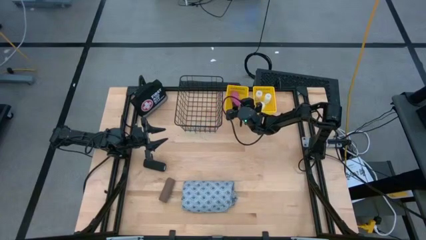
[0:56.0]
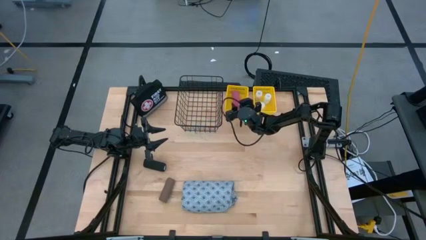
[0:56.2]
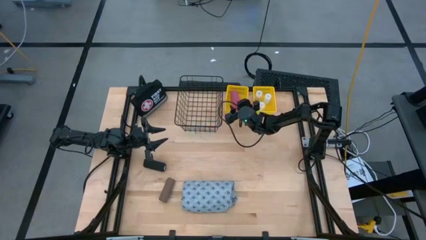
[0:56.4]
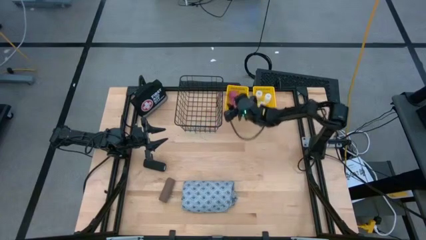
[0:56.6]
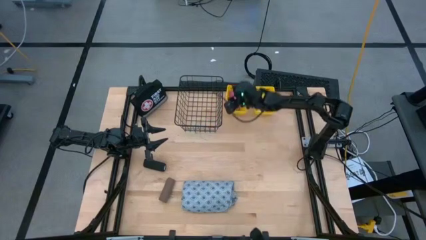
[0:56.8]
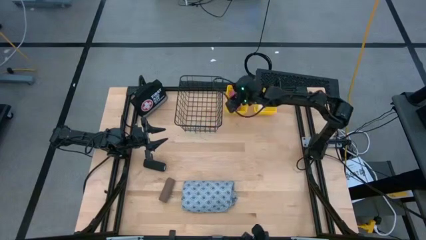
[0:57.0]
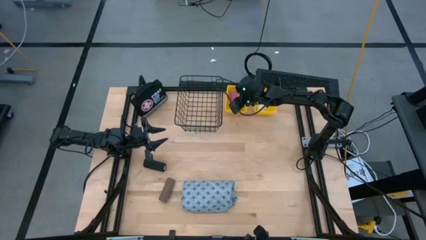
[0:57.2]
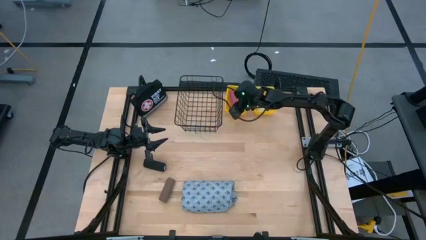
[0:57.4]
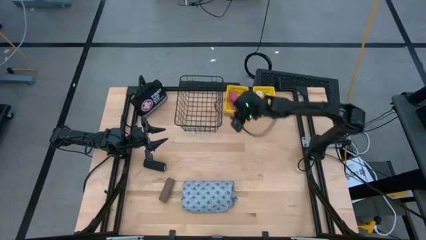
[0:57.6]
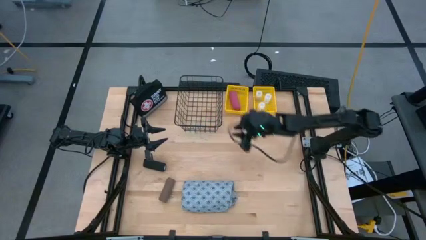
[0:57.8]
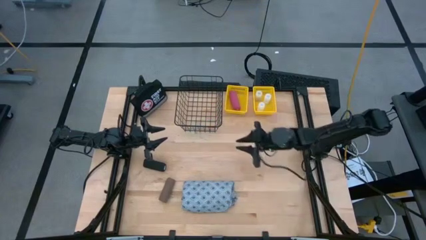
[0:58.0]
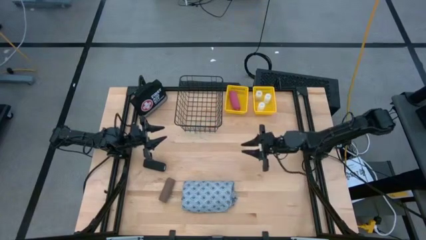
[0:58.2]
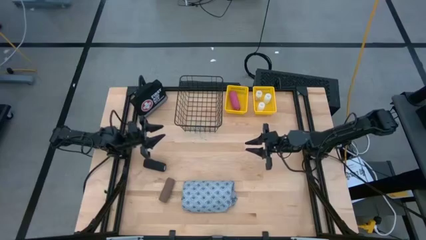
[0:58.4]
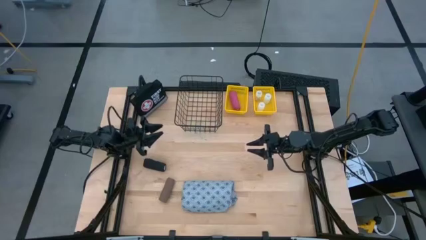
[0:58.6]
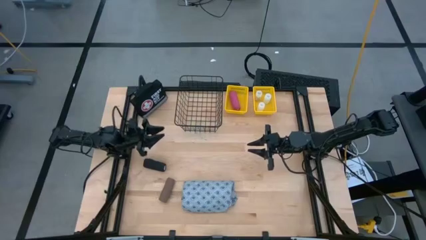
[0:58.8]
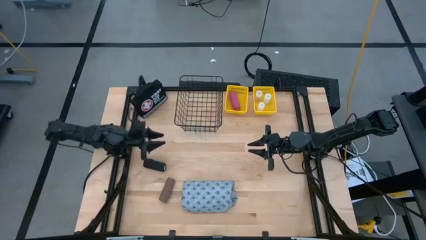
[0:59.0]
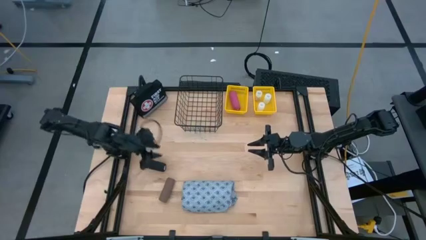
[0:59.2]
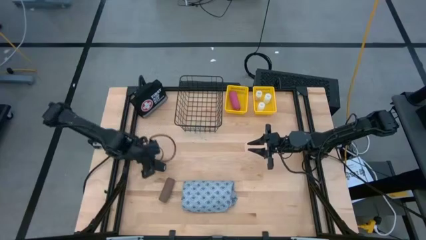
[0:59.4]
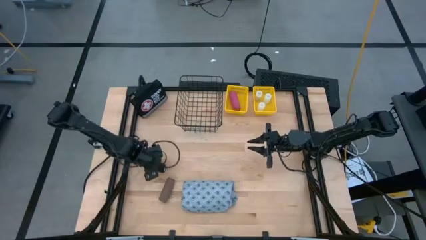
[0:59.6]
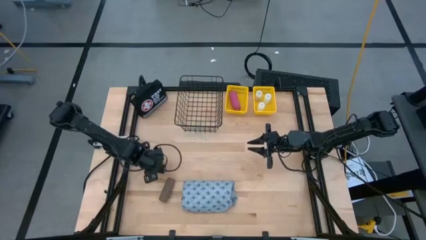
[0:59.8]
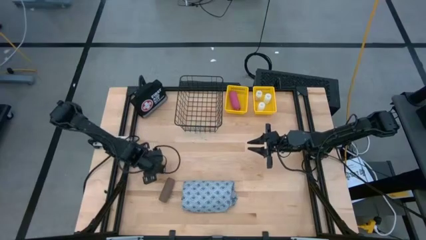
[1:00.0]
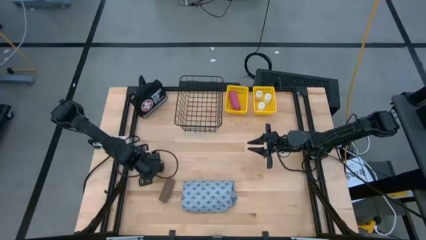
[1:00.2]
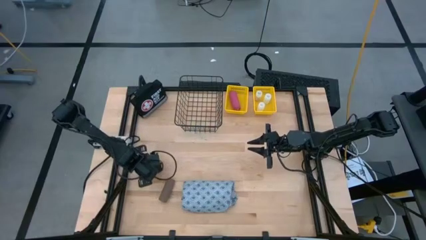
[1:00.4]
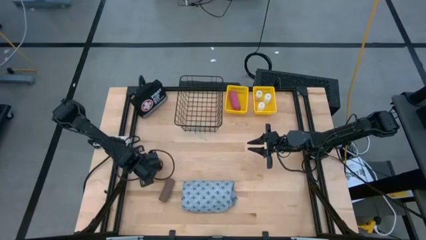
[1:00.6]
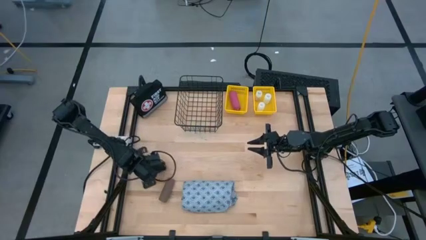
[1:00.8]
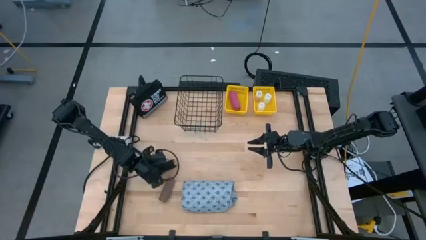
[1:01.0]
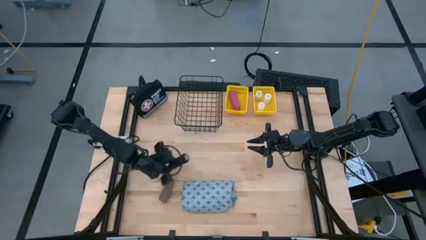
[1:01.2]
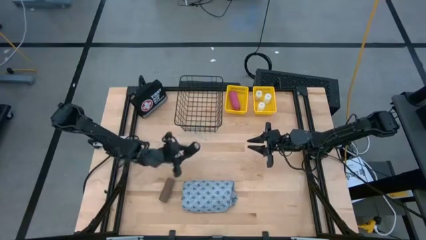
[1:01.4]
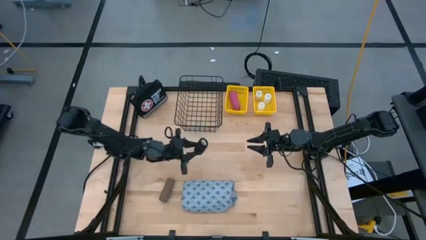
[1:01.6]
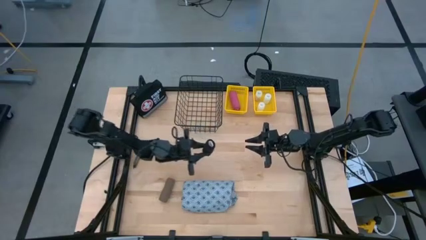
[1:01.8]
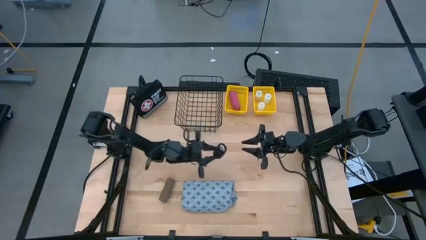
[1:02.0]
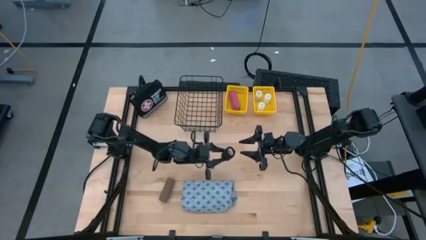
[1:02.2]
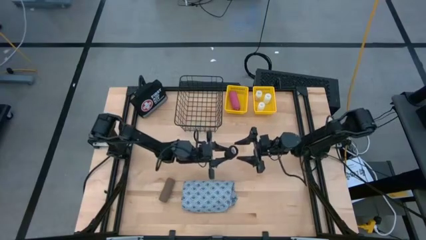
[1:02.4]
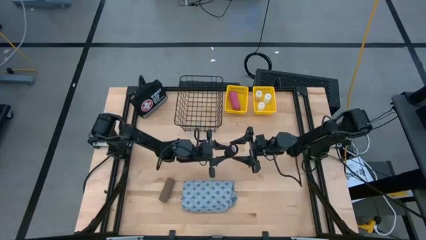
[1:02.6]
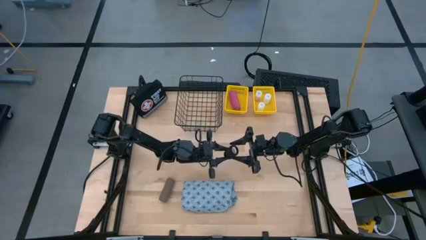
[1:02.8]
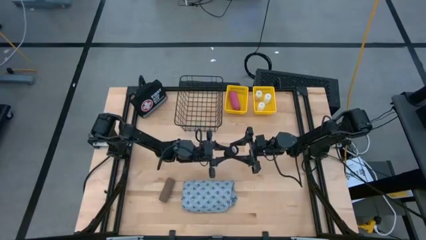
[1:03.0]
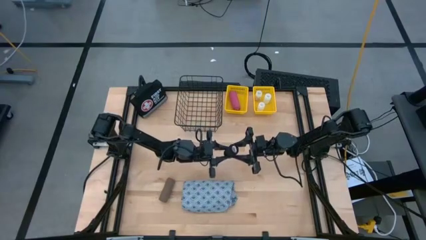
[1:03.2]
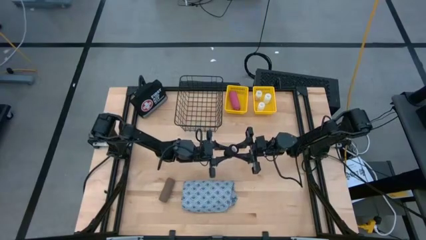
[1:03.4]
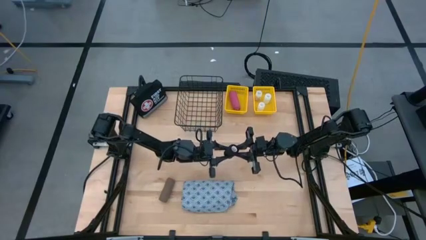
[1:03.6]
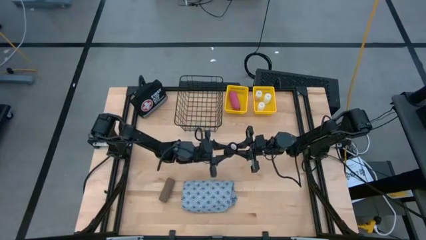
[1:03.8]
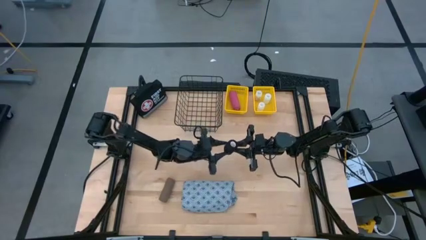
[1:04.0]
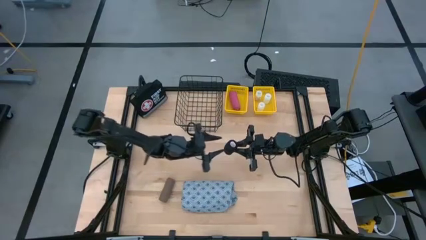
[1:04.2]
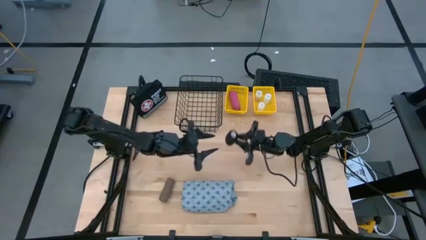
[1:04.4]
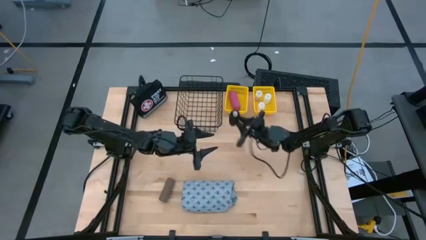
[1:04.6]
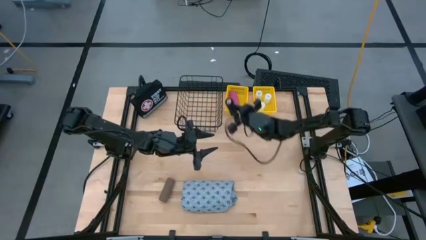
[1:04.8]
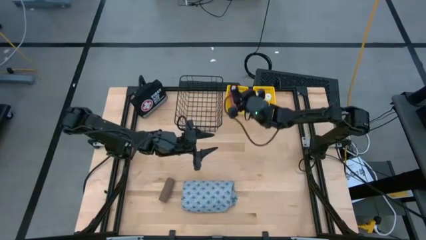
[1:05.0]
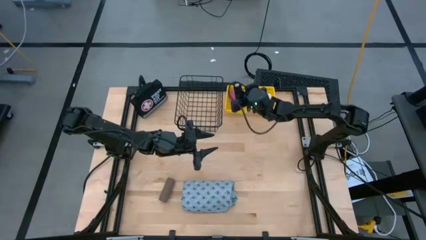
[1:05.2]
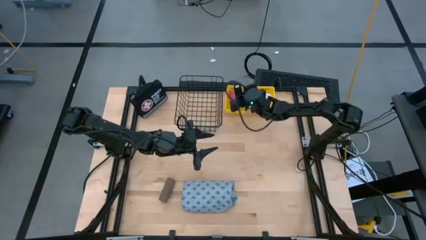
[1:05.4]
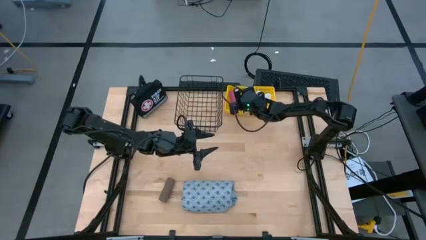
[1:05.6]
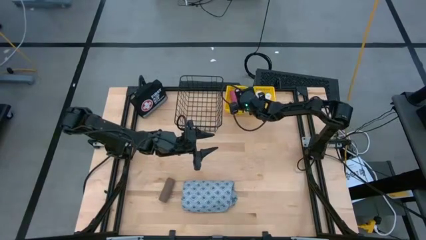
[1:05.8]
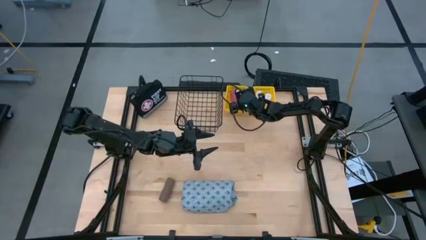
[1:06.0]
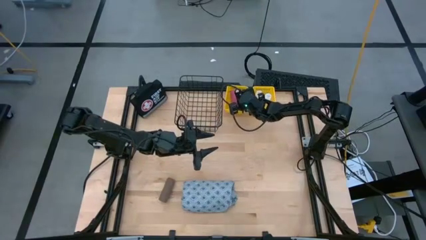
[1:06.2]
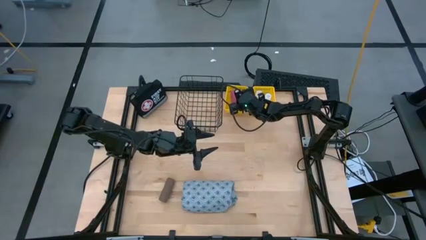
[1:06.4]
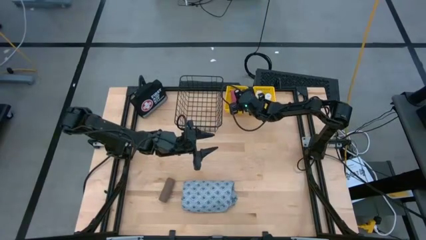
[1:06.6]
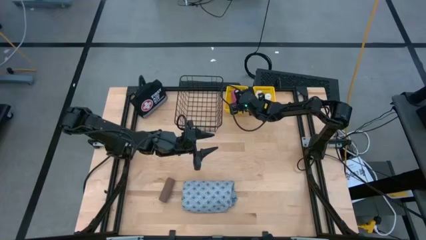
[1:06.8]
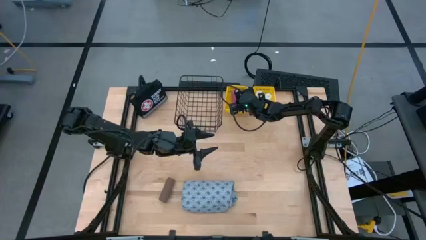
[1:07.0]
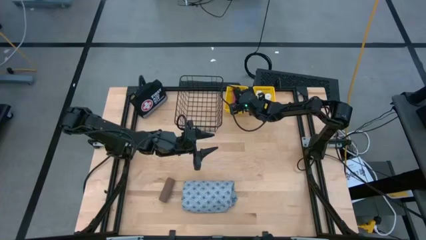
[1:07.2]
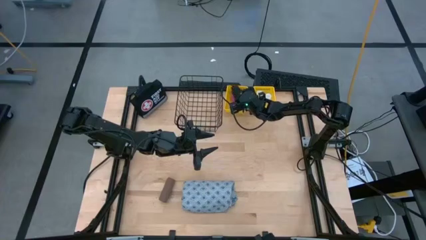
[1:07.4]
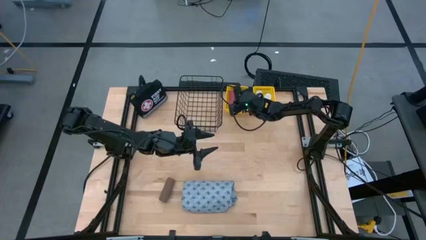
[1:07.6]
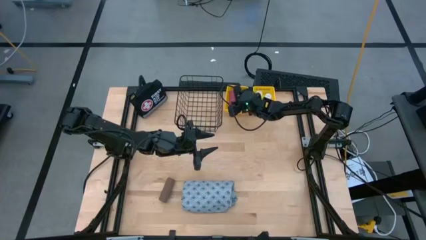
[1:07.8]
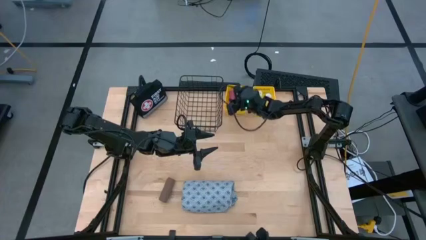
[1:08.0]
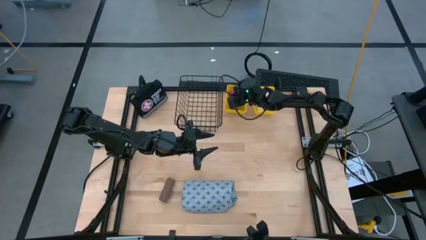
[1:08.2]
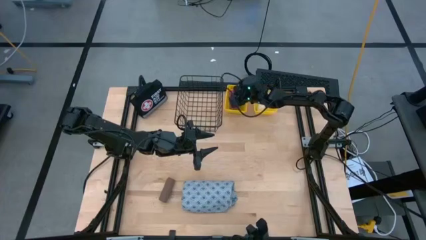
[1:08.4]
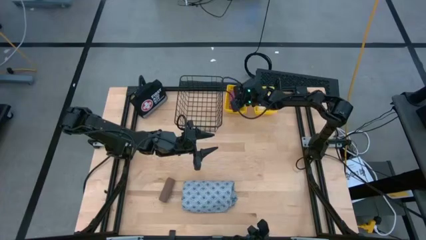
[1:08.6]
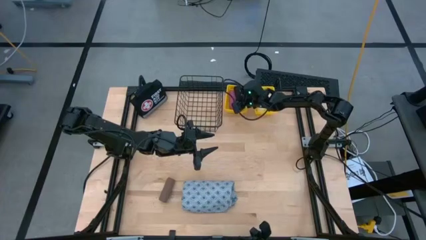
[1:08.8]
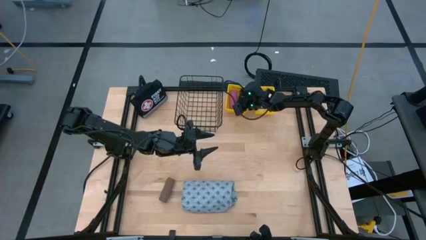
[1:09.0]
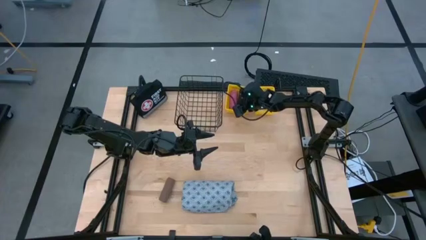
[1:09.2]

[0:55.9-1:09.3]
Task: Pick & Place Medicine items
Put the black bandage into the left yellow basket

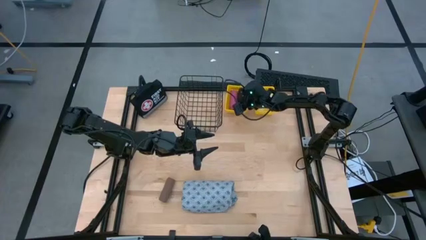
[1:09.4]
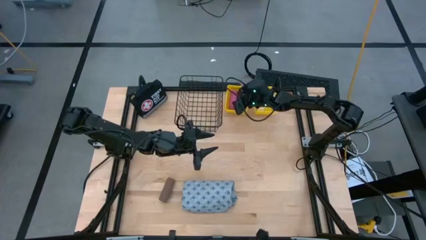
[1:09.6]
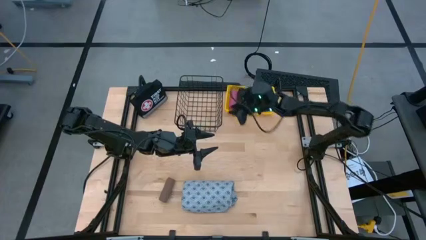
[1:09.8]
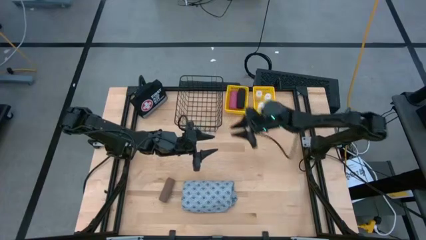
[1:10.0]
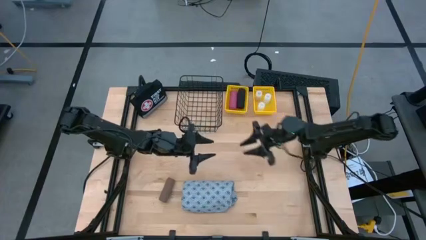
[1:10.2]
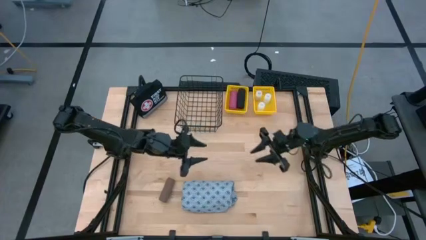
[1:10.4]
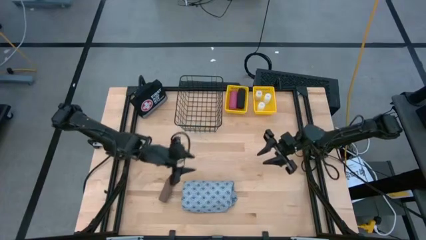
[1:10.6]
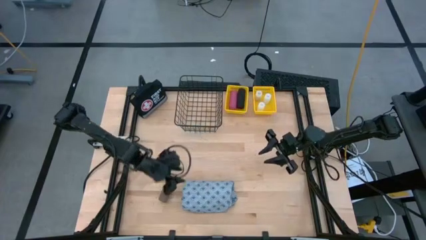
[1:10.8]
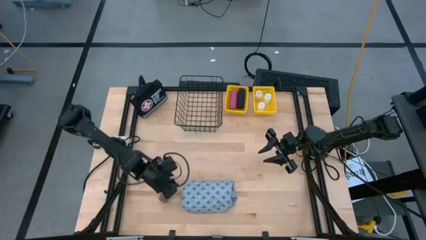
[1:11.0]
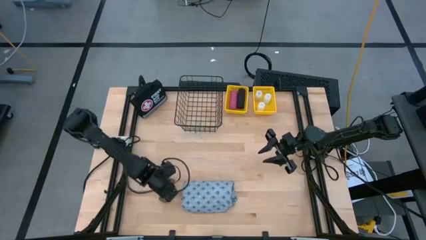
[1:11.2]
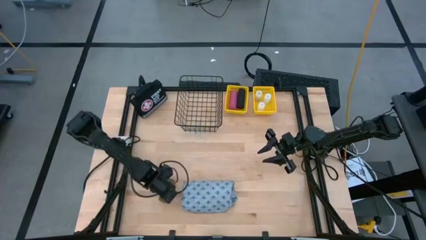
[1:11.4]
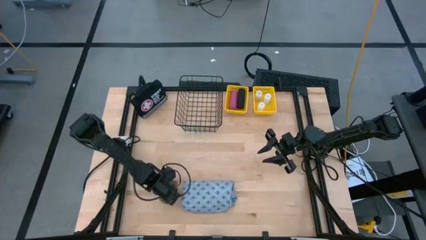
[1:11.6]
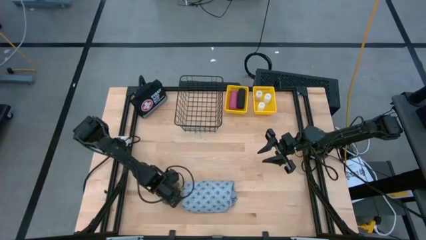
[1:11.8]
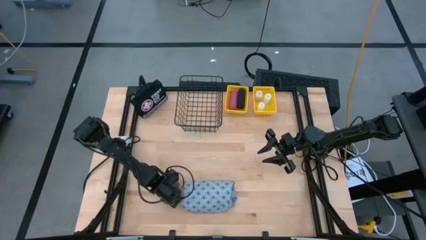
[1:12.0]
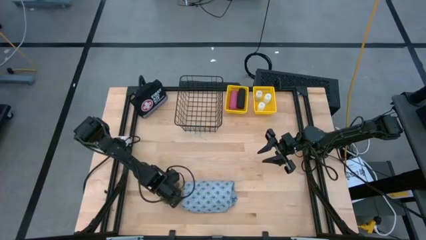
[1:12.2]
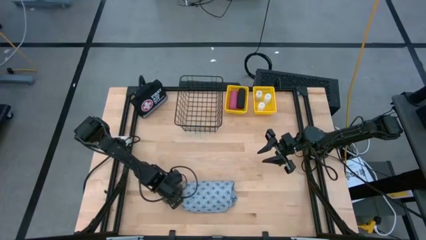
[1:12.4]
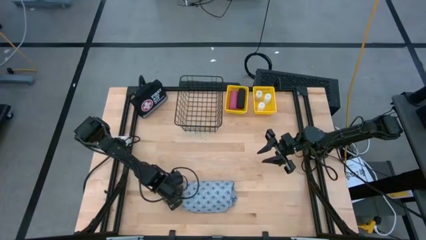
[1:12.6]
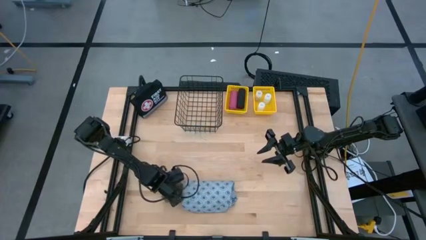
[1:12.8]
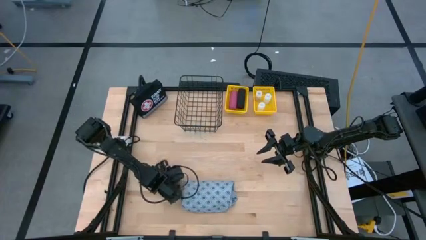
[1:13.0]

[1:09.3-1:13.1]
Put the brown bandage into the left yellow basket
